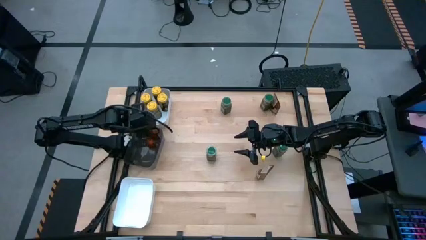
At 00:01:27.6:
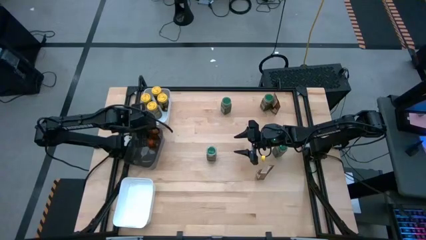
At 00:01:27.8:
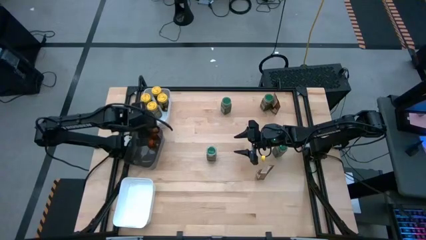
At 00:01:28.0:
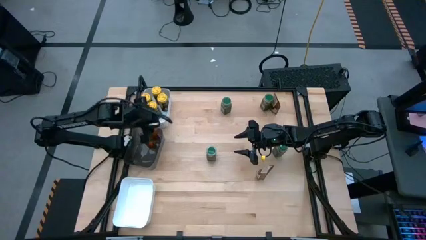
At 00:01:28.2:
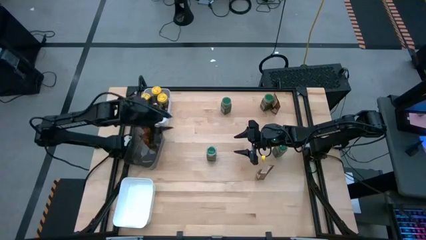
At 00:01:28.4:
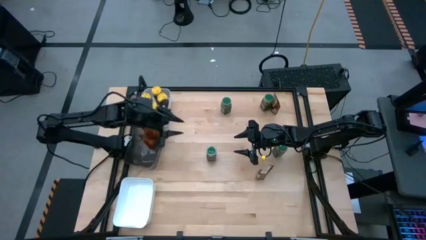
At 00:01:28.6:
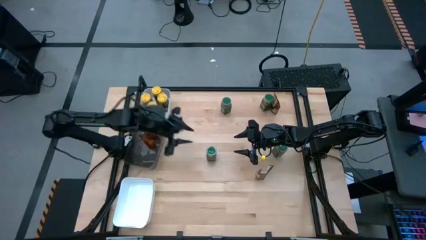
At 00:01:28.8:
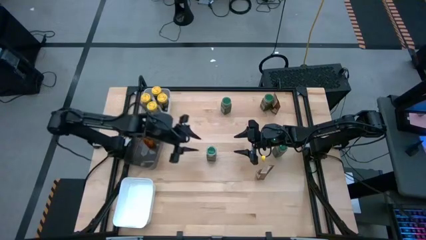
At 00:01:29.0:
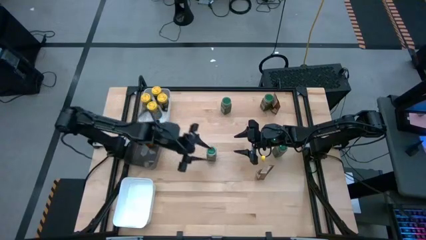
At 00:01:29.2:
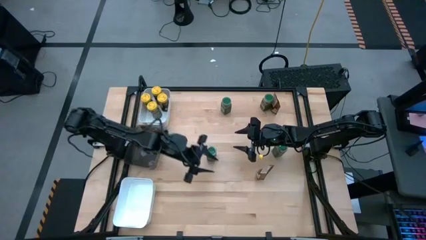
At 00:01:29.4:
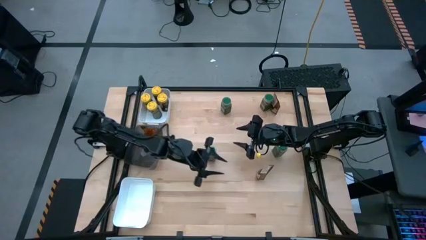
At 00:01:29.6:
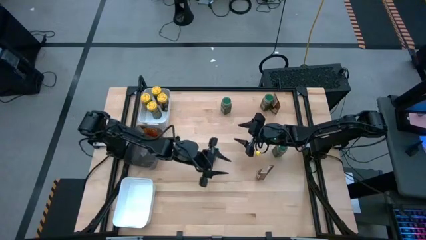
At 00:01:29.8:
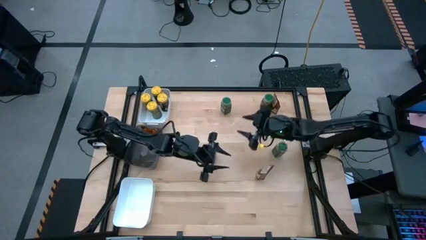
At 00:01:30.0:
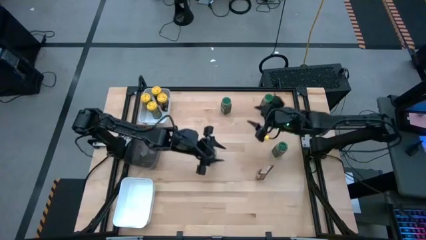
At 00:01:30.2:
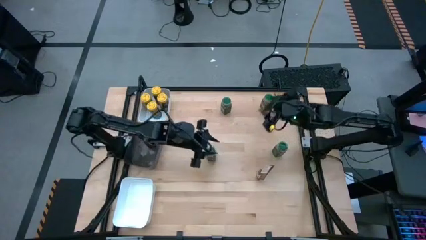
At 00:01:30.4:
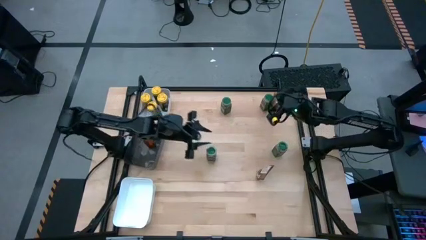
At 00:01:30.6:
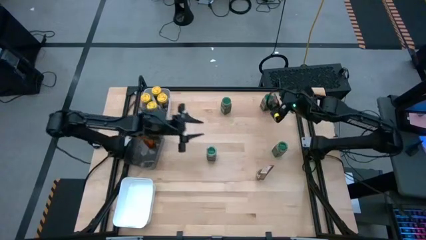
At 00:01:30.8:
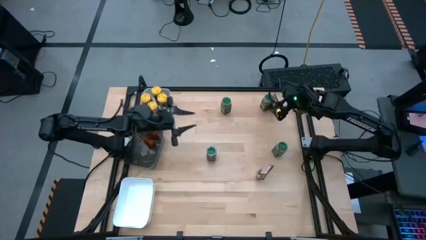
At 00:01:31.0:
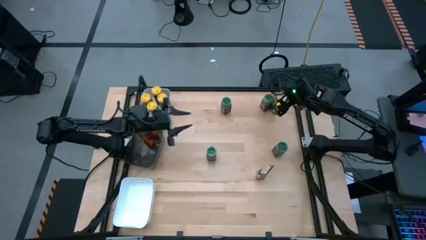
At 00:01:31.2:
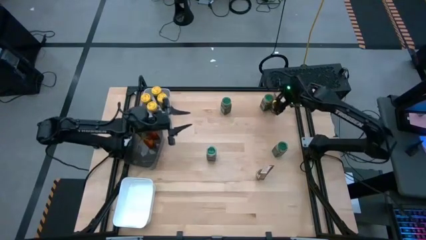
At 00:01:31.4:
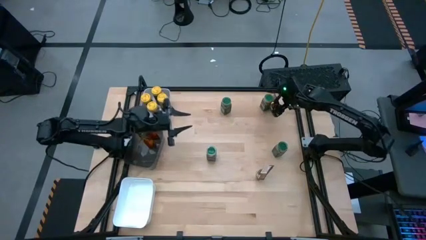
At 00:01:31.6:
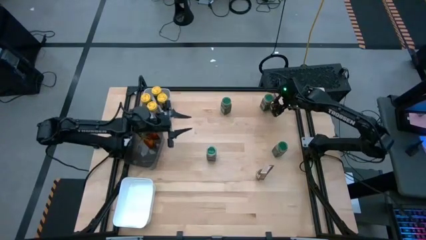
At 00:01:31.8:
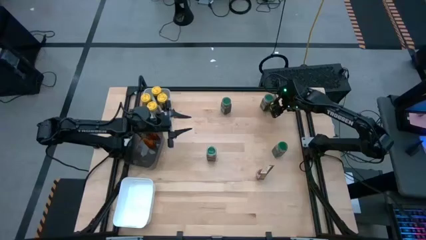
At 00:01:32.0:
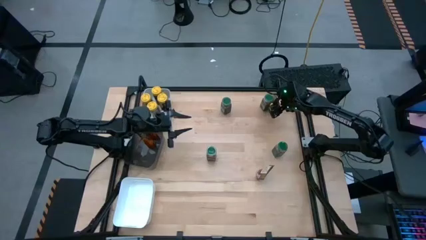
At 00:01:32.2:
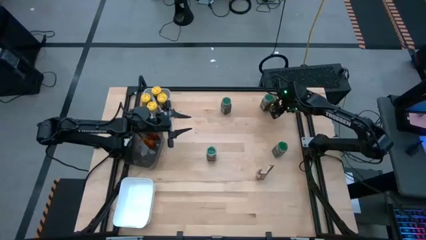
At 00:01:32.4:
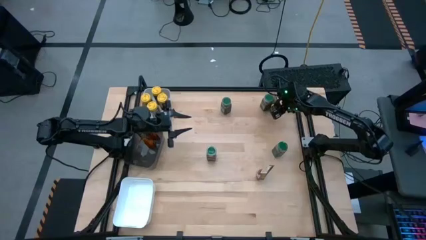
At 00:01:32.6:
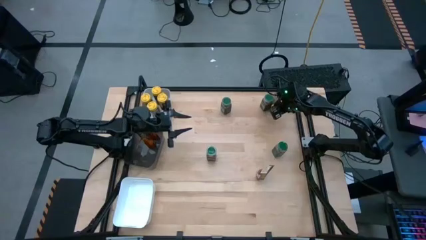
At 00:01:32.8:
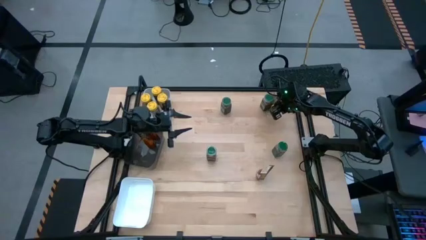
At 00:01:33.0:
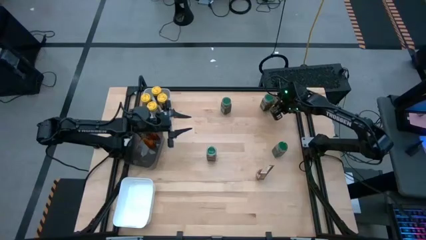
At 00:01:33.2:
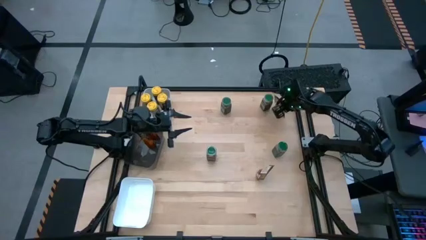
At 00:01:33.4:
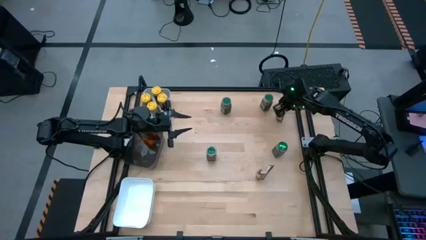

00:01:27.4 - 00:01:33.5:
Task: Sort spices by type
Put the top orange seasoning pack into the black bin

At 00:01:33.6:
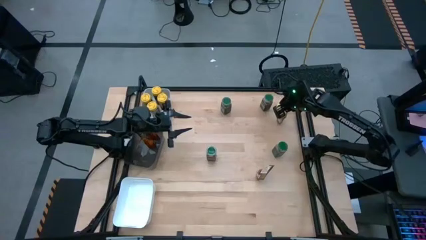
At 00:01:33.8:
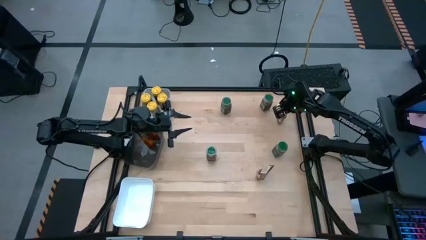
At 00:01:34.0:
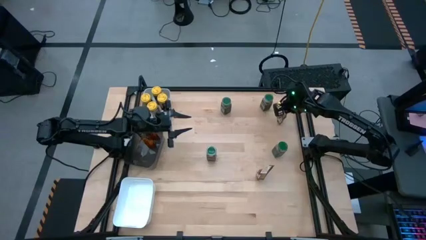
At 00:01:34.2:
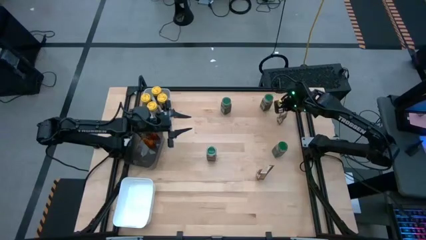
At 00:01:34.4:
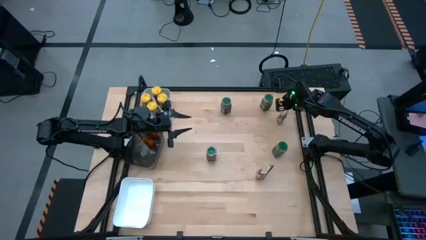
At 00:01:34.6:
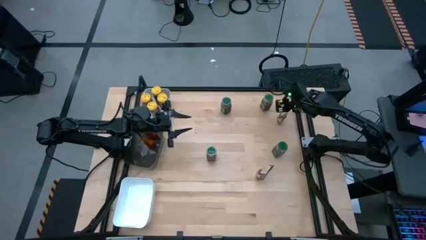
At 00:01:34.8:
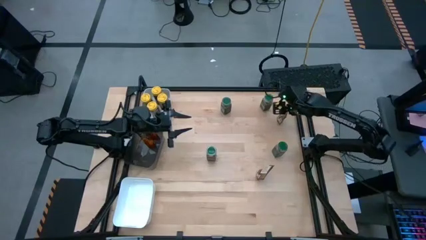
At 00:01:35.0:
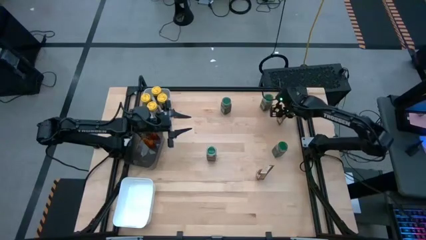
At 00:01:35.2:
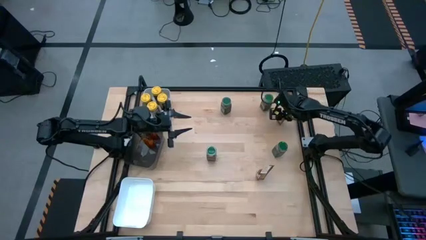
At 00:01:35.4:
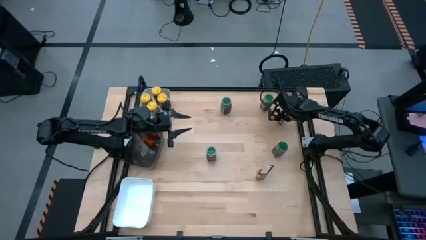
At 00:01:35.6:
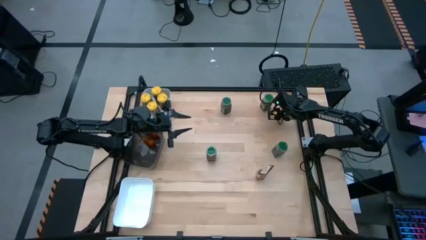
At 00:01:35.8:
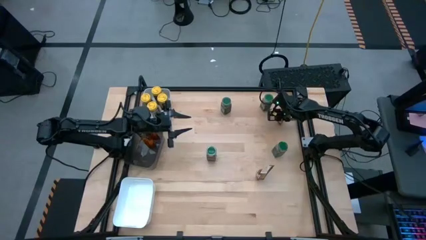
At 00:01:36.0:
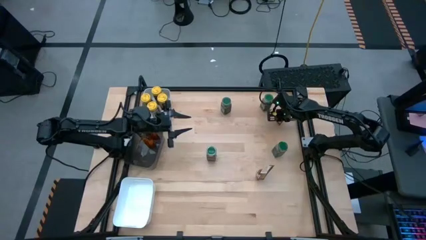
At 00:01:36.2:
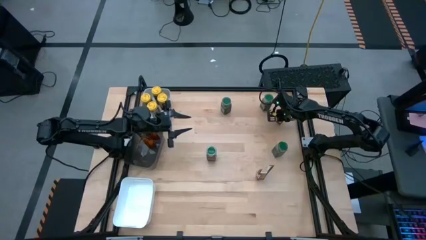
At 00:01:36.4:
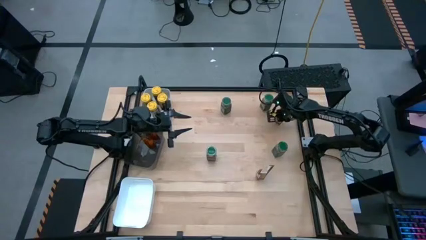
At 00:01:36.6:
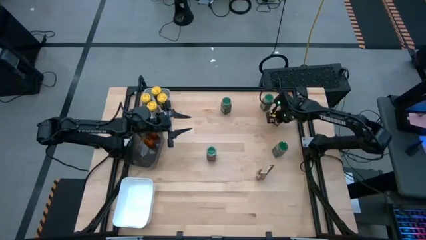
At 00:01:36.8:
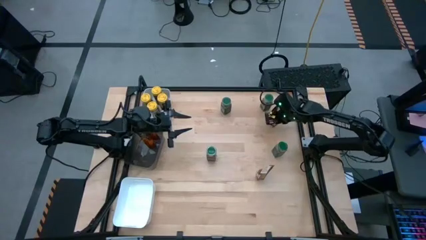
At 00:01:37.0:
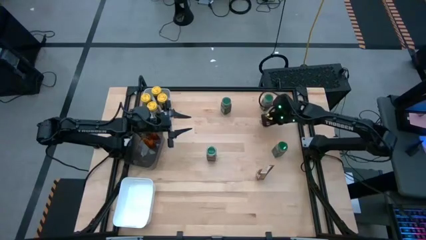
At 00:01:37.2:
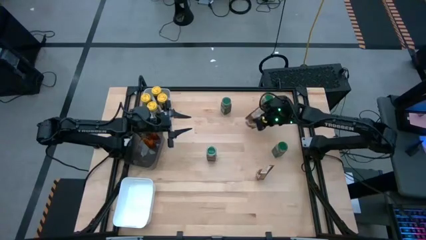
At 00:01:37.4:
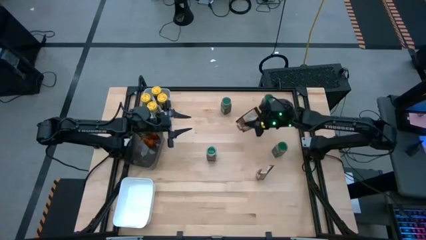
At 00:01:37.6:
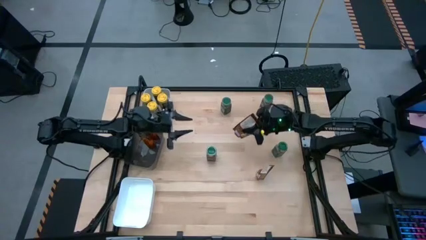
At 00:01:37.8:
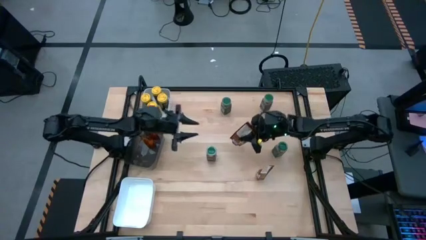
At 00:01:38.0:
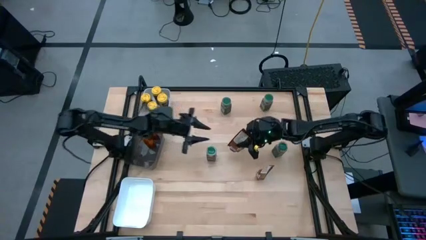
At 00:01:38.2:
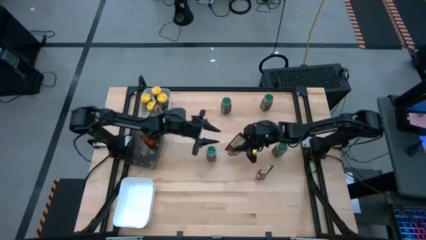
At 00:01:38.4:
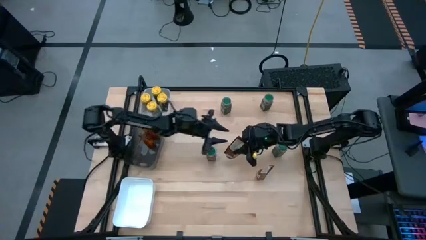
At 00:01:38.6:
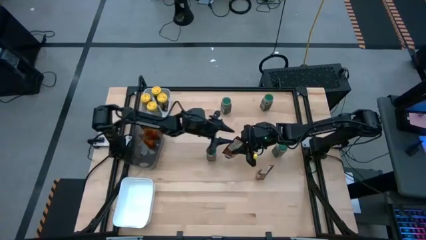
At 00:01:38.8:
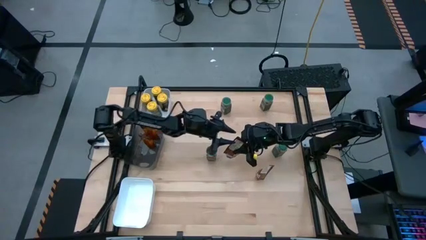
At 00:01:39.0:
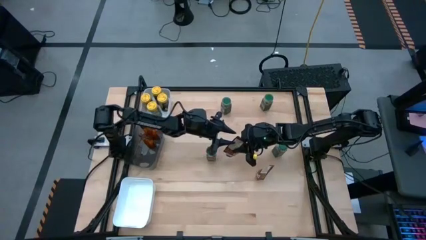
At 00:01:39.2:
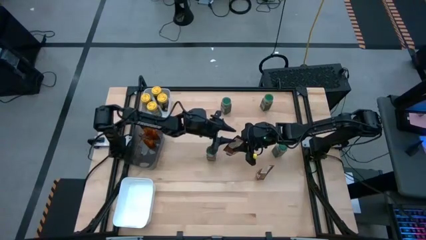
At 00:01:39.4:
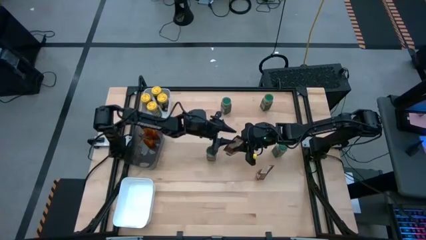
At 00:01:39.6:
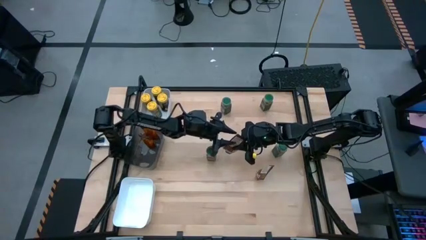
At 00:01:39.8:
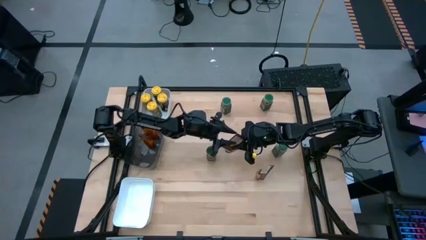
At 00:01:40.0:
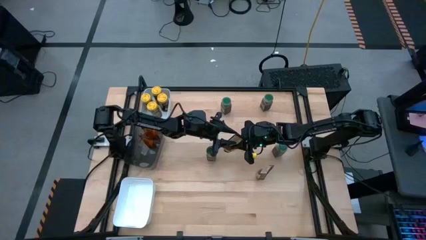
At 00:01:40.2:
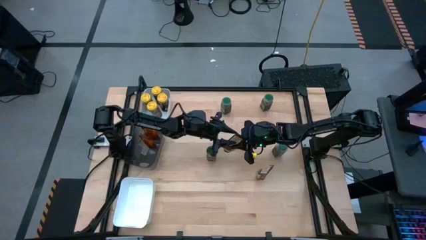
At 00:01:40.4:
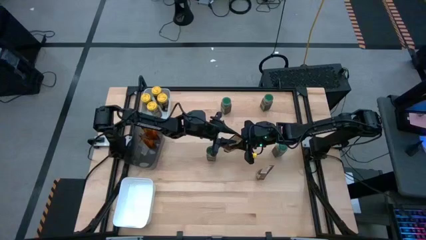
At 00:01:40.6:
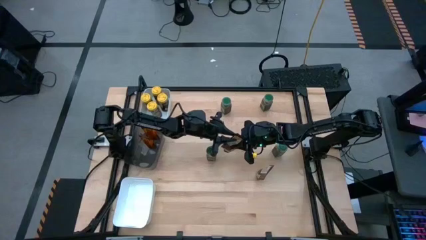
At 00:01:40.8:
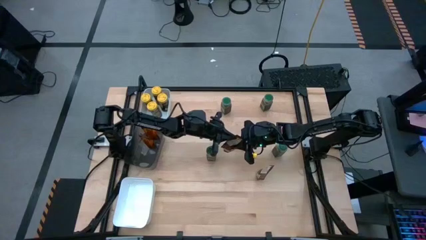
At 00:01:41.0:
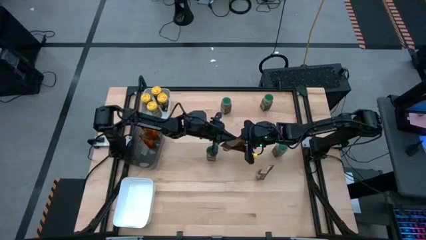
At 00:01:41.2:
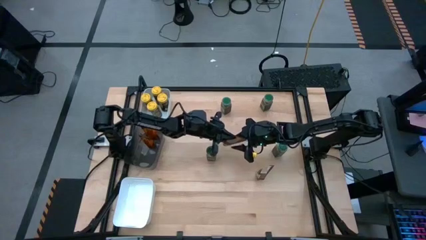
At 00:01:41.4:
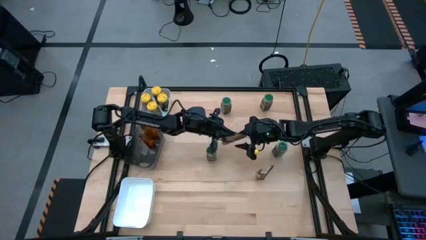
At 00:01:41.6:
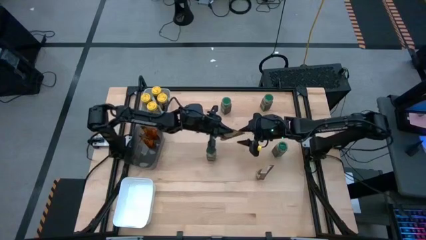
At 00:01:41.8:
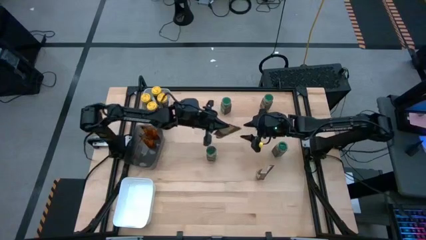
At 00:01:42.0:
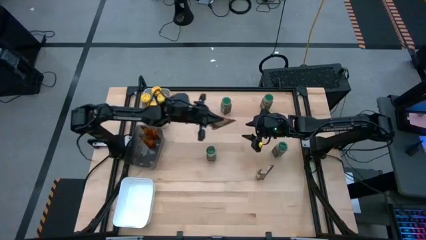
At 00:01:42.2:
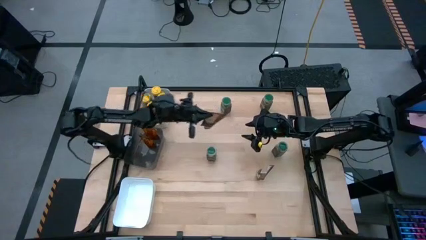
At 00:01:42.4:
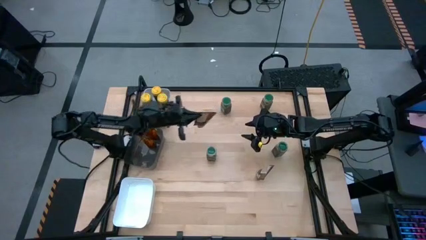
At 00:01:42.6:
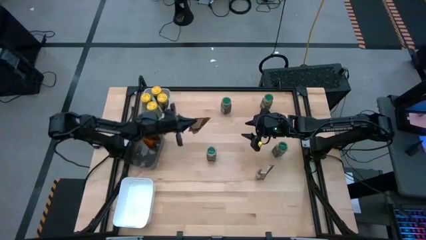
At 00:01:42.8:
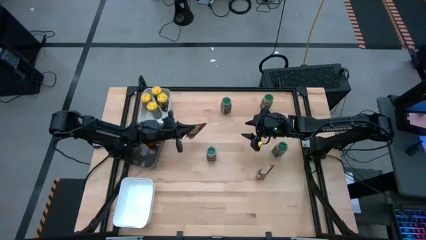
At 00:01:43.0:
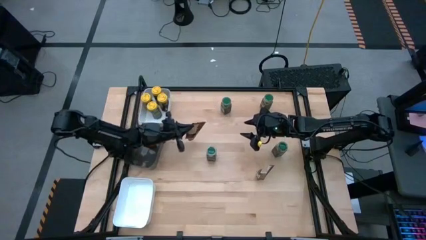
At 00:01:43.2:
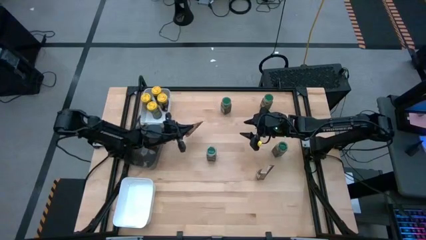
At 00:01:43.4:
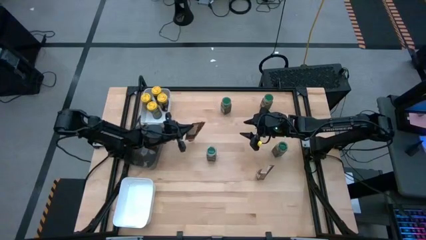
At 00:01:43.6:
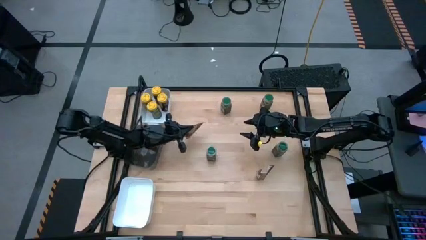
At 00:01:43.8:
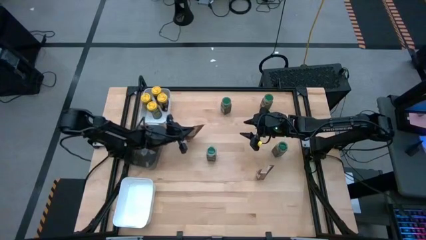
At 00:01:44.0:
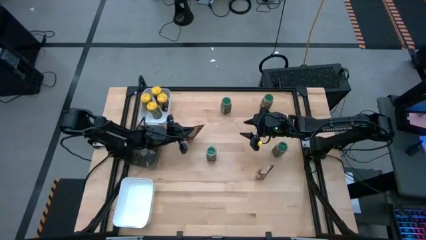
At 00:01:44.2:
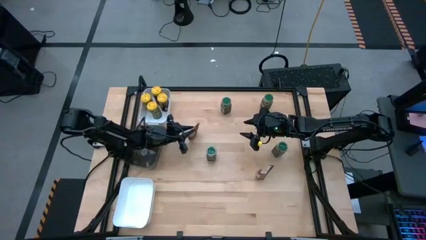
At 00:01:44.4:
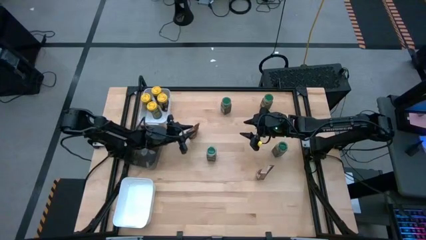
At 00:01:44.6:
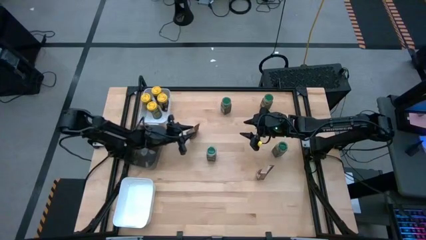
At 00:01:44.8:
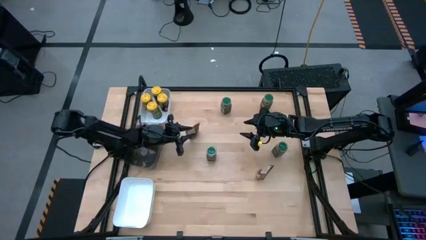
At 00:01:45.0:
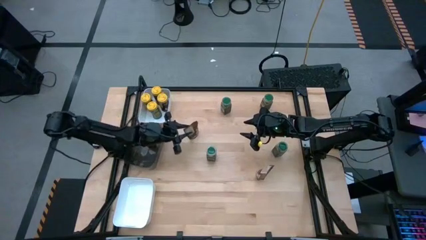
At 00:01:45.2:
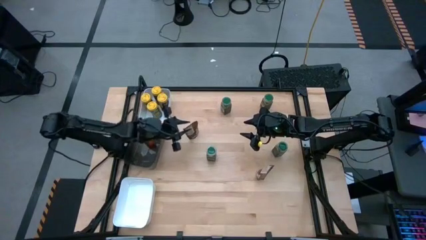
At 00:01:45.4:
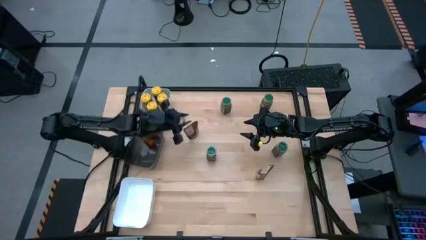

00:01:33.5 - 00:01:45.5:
Put the top orange seasoning pack into the black bin
